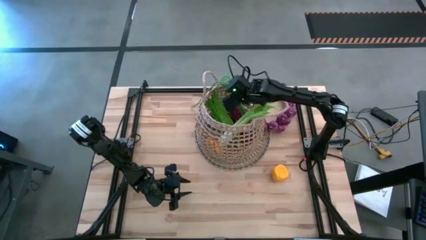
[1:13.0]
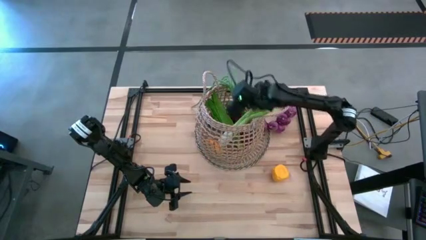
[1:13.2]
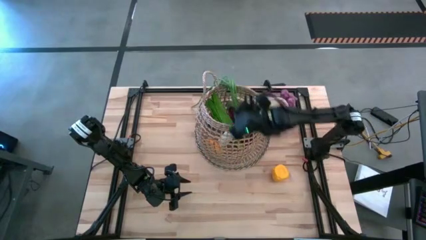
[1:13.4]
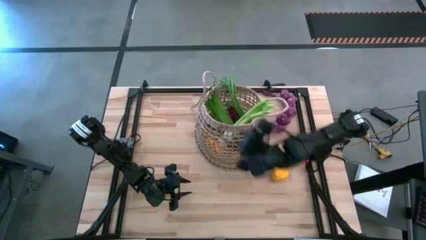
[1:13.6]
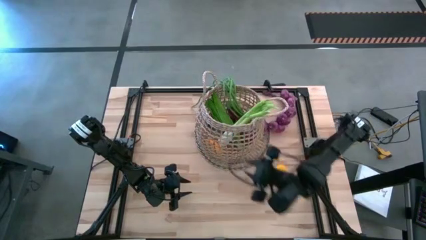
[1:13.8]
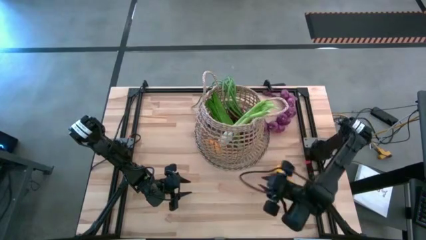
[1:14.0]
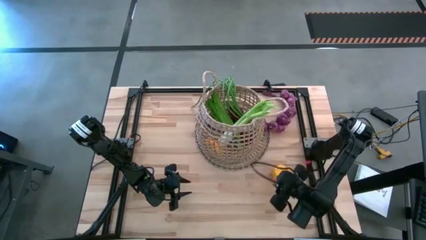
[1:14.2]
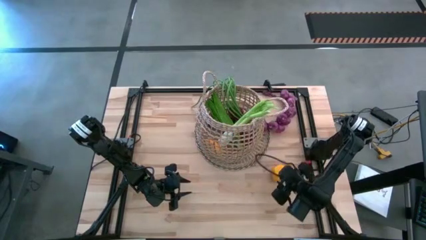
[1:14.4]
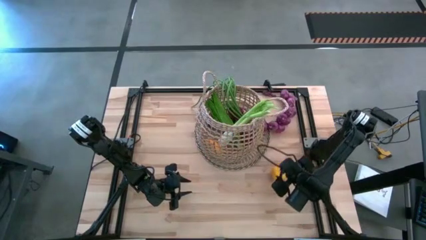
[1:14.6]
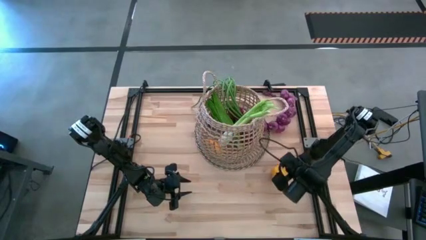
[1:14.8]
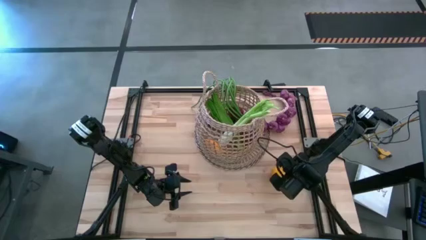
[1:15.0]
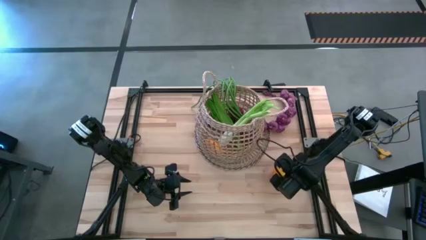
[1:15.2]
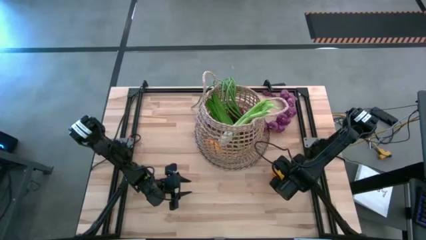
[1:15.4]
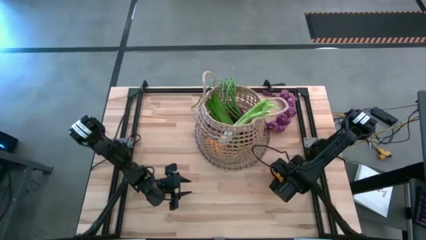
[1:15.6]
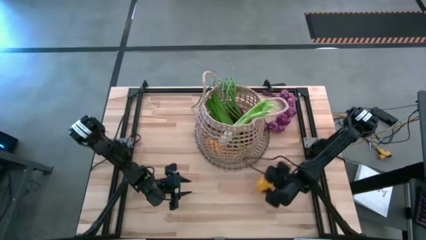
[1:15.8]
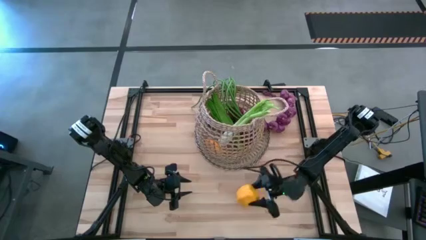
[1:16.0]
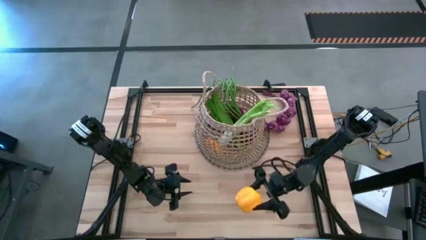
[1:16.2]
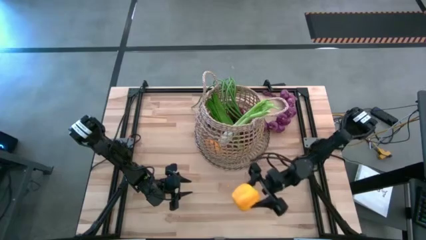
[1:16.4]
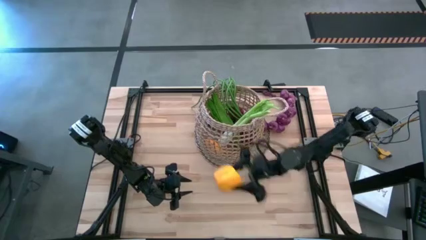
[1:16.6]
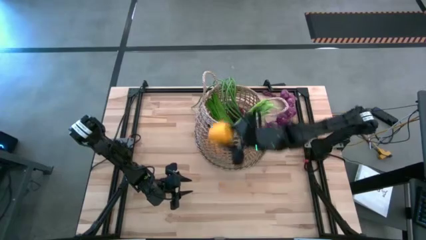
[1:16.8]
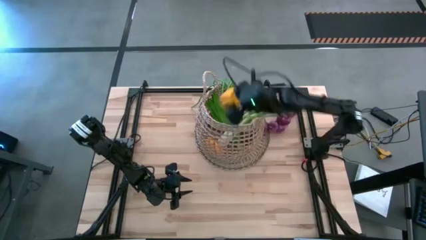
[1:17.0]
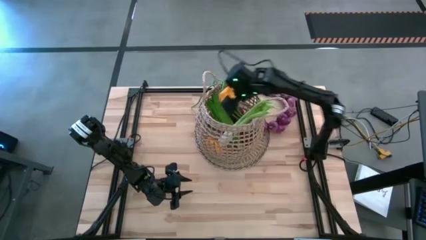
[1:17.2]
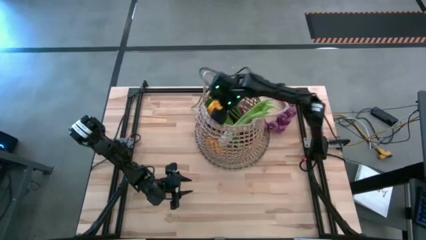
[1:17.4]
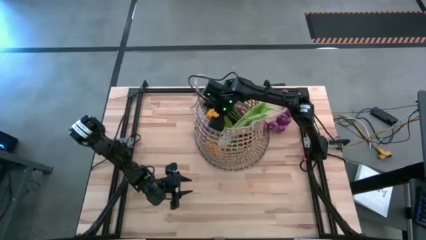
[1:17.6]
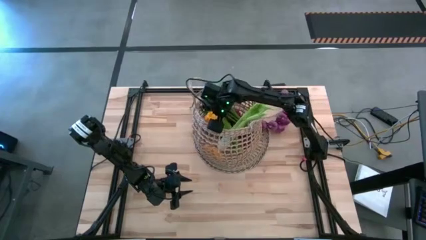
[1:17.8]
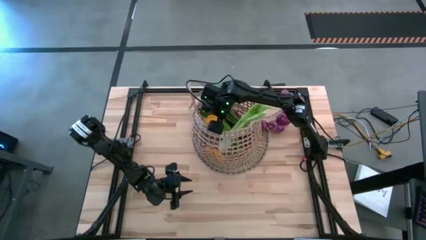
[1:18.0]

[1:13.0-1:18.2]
Task: Build produce basket
Put the yellow bell pepper into the basket

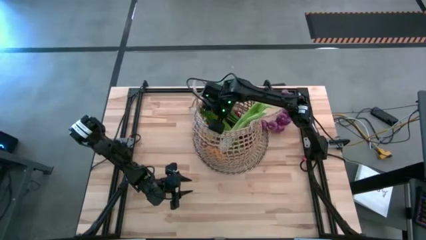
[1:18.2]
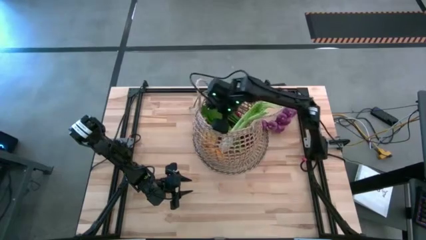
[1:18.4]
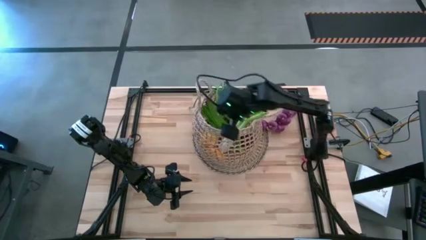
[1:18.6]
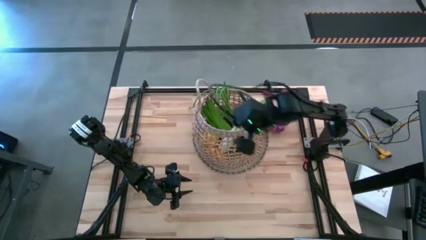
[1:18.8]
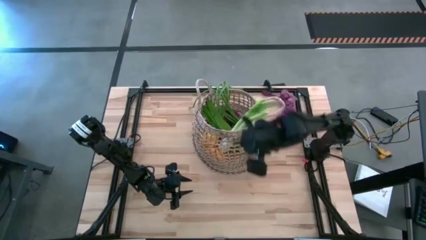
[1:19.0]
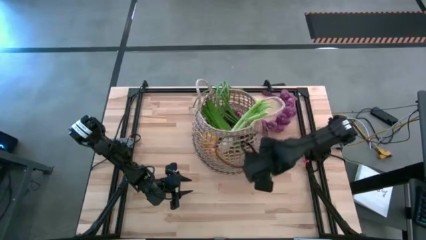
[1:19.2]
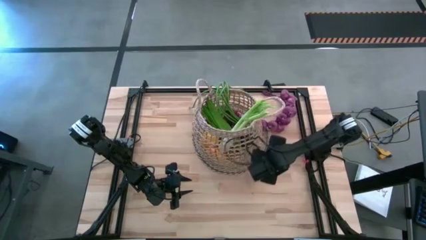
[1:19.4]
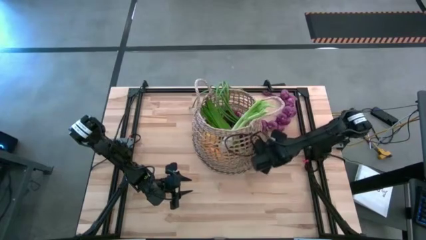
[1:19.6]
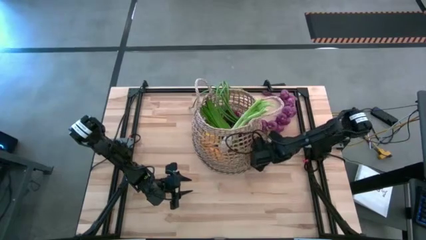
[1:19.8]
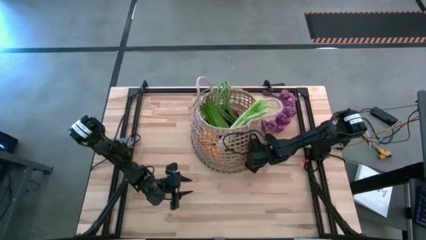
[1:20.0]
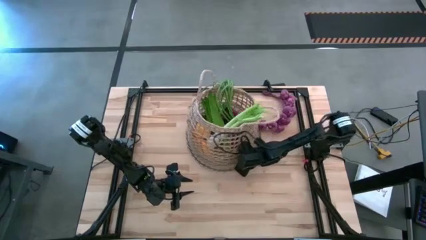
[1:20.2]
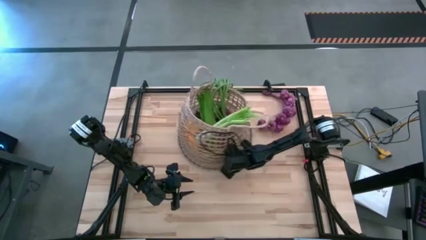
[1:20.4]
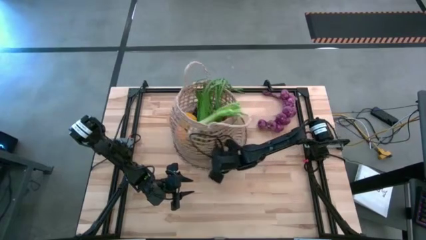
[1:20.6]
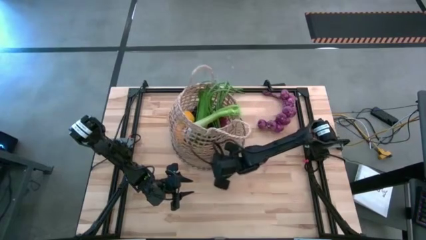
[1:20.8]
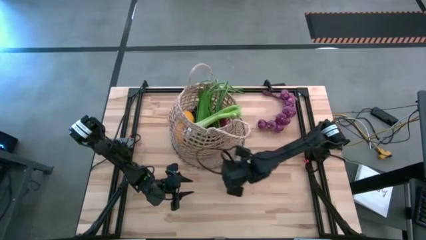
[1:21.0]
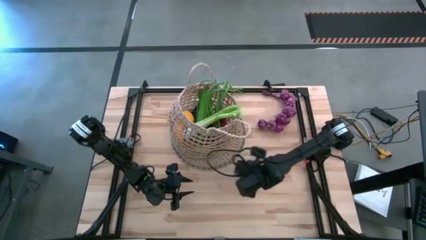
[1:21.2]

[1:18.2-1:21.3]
Adjust the basket slightly to the top left

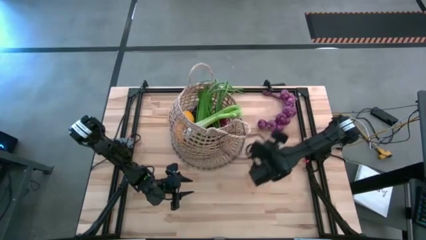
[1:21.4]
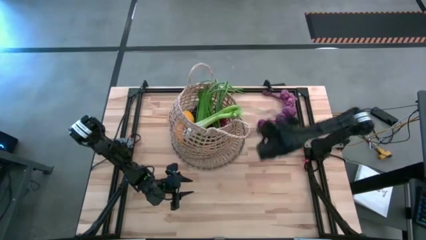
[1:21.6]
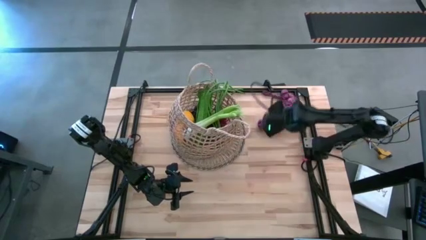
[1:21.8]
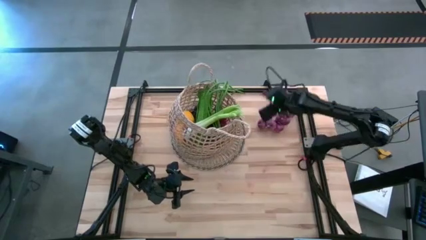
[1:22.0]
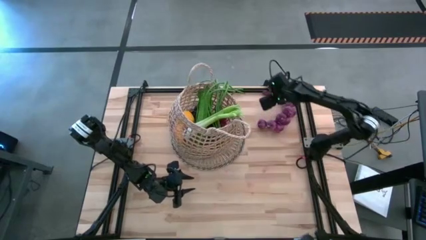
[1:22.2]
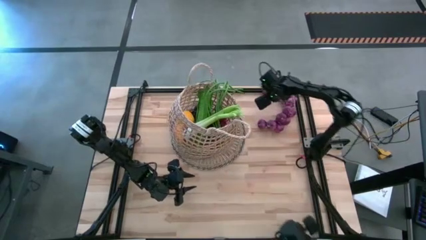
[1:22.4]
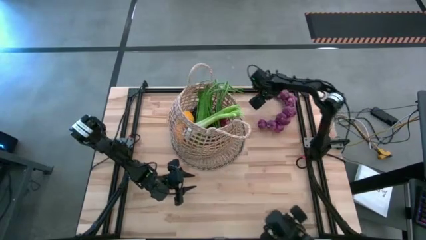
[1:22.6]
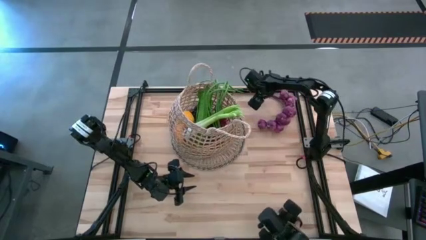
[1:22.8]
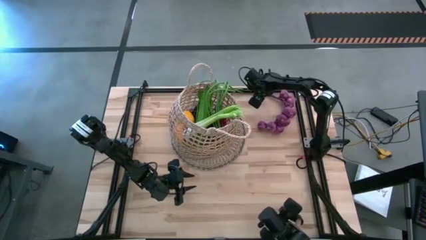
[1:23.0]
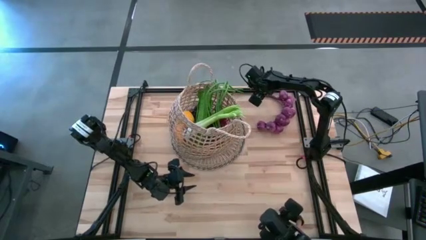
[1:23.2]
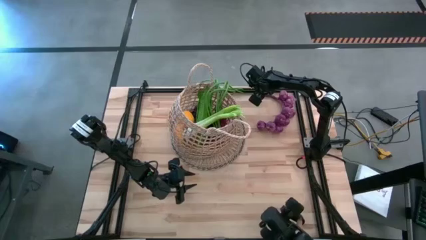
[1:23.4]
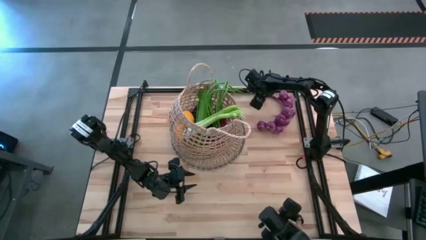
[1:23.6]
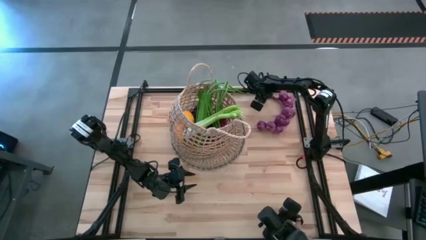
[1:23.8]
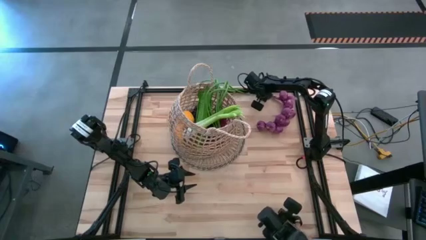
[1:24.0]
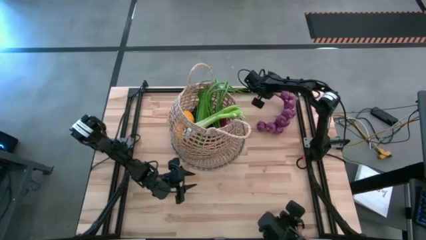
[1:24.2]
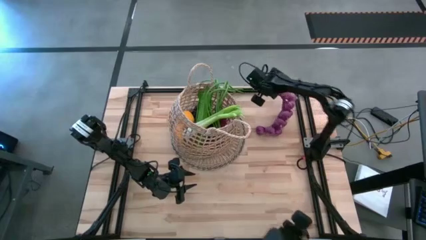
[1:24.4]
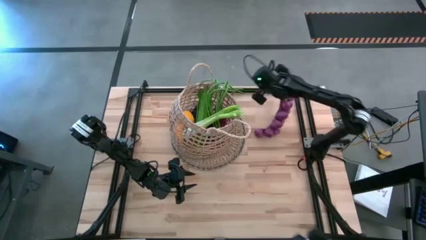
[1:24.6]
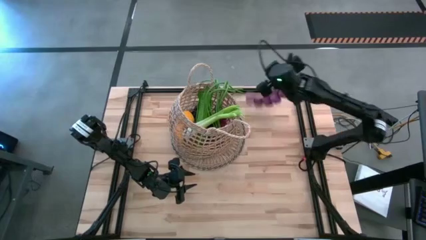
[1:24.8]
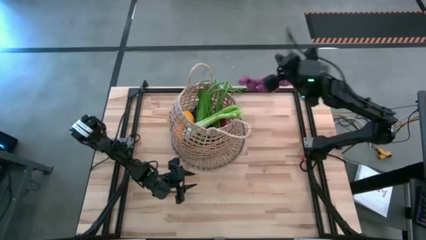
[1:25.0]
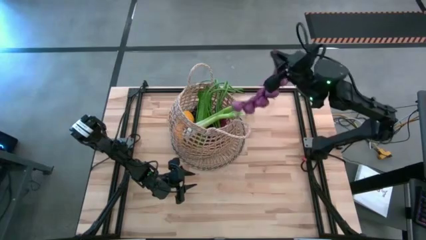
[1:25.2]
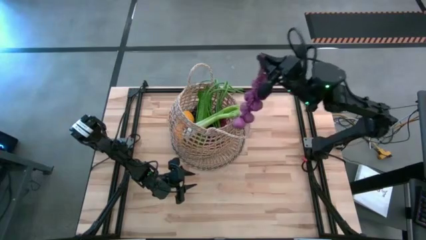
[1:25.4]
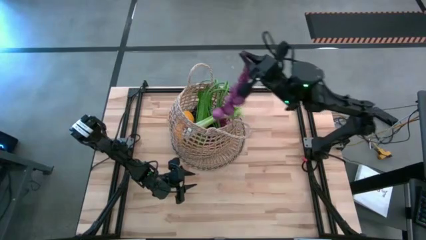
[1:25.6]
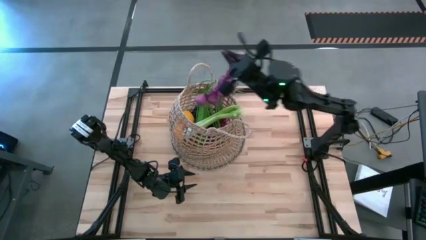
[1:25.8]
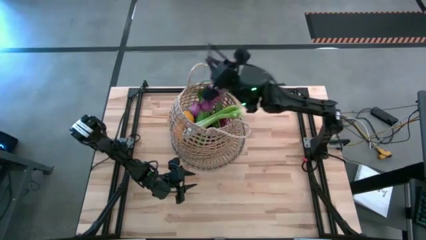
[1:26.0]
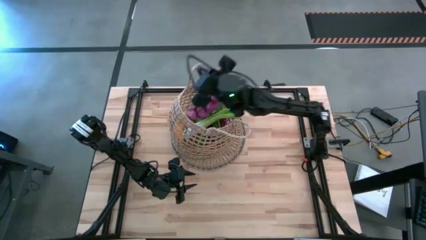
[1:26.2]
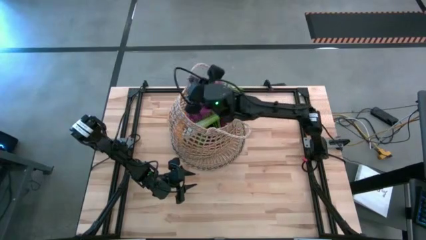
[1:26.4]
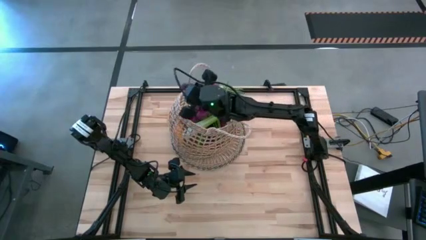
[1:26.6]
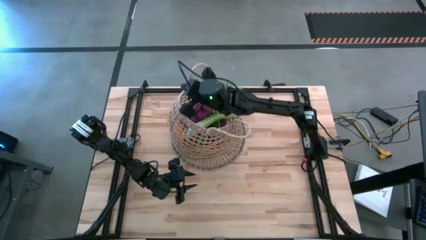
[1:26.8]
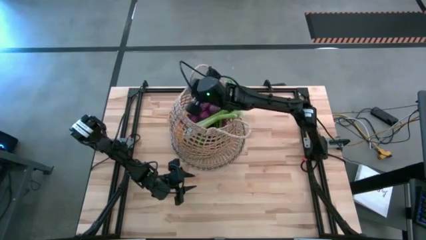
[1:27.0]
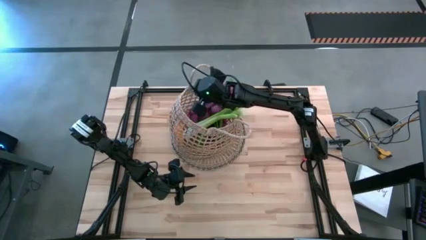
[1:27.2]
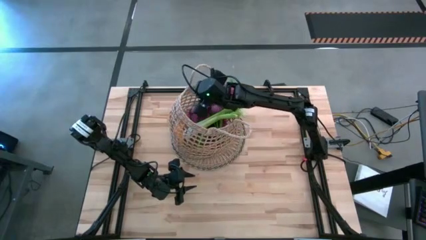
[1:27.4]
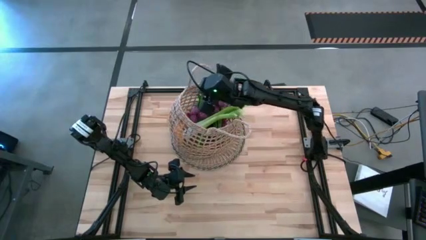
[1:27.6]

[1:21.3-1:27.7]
Put the string of onions into the basket

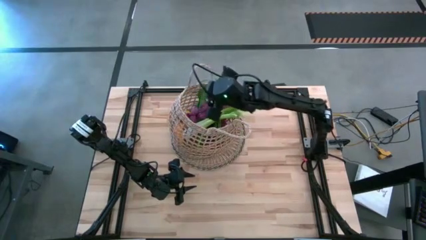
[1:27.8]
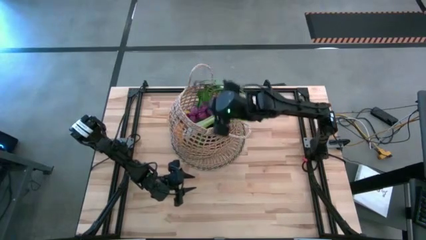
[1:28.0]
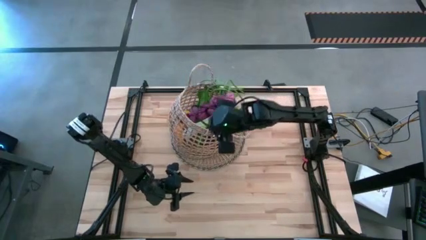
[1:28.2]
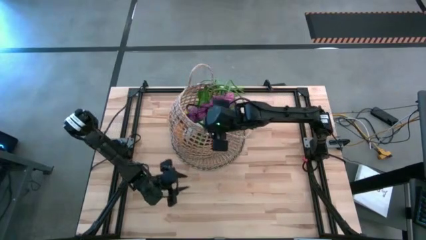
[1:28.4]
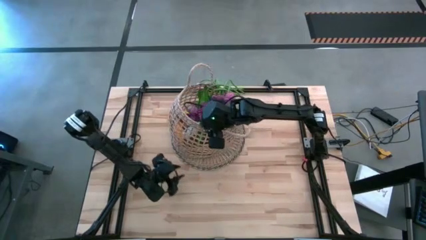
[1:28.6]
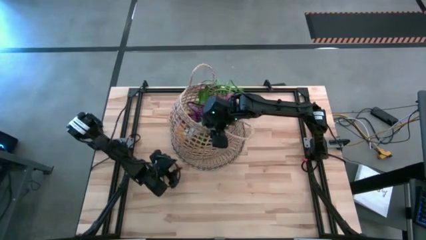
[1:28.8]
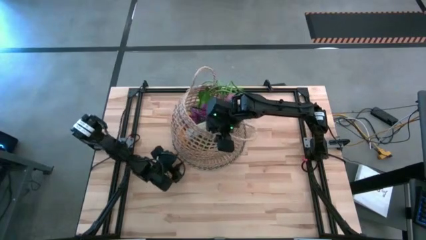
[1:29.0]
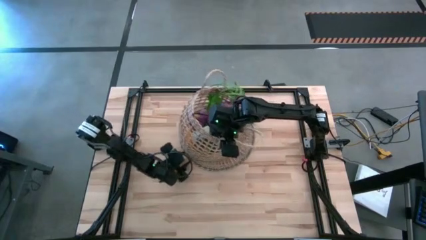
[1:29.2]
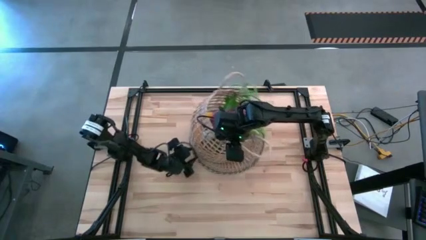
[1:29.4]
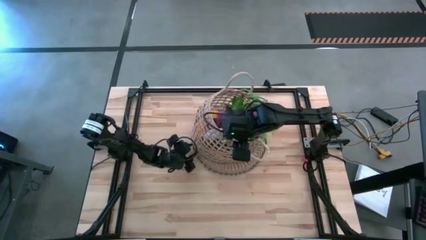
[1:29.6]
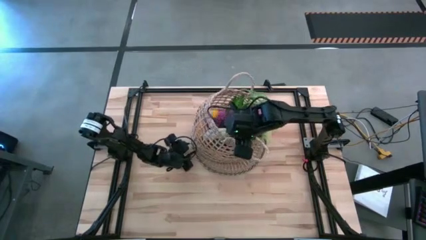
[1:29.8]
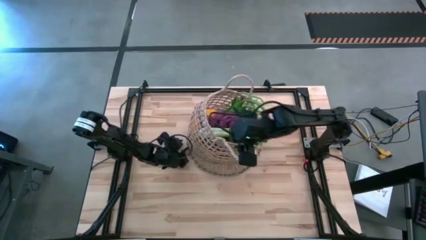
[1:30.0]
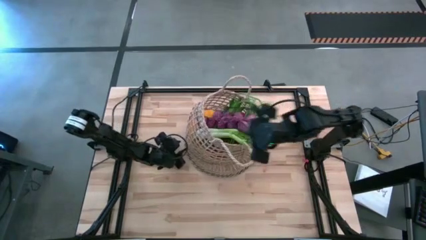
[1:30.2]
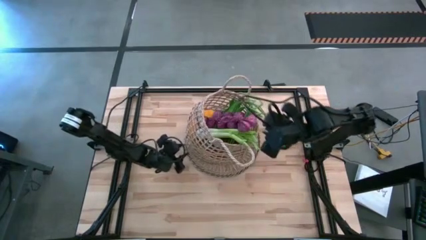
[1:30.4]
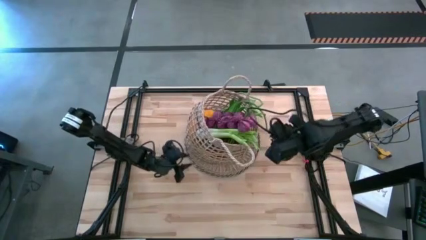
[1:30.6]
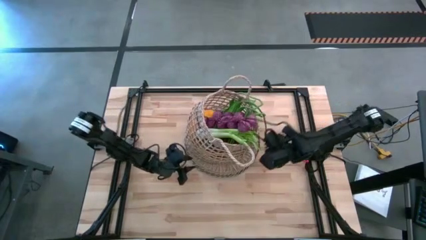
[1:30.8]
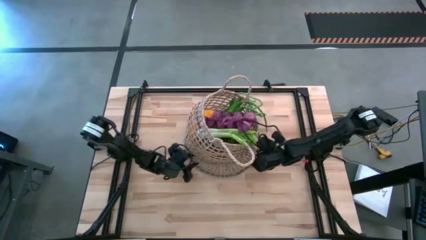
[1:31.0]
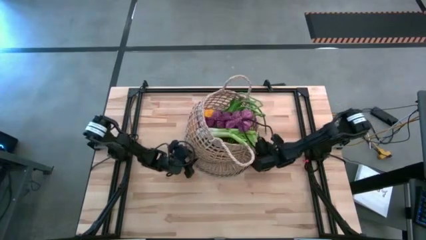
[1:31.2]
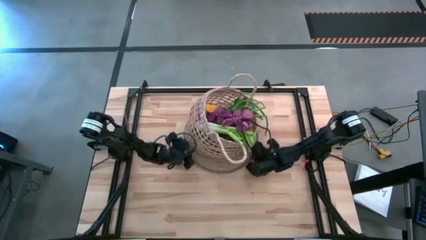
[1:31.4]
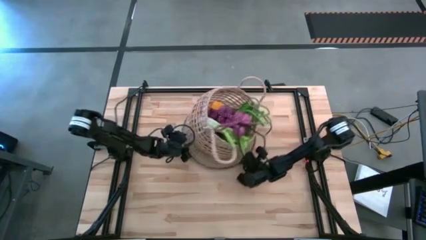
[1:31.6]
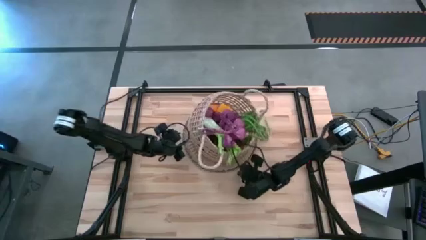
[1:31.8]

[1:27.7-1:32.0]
Adjust the basket to the center of the table
